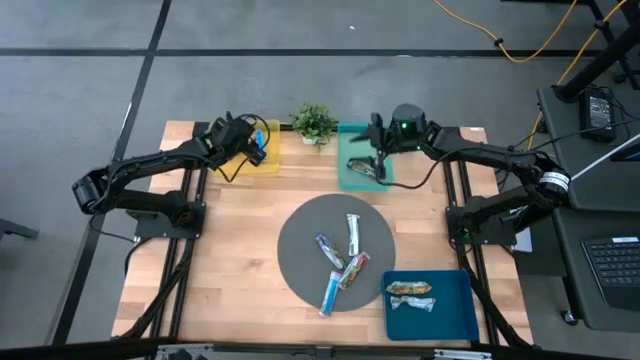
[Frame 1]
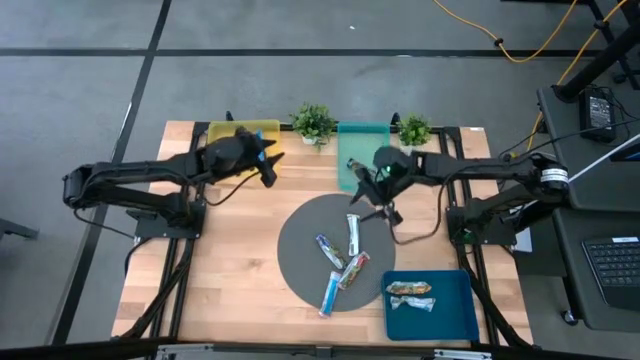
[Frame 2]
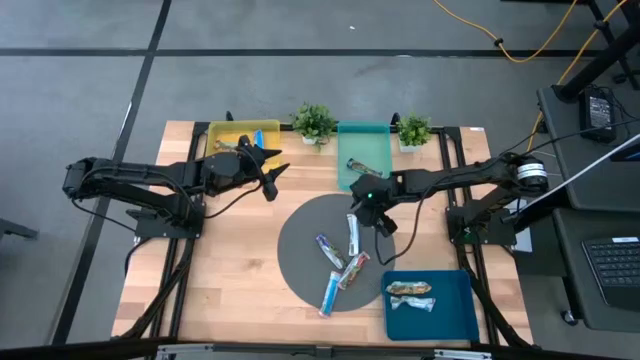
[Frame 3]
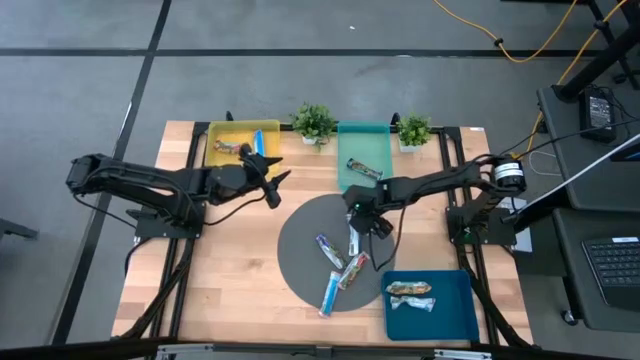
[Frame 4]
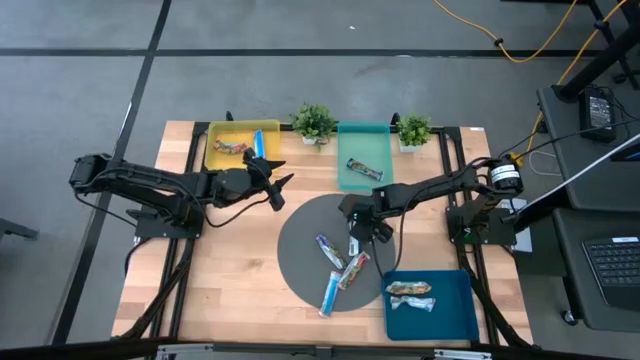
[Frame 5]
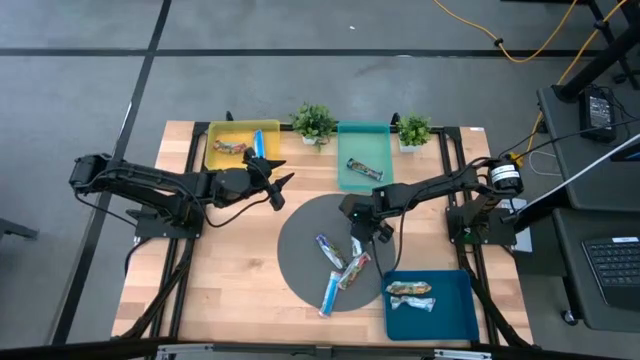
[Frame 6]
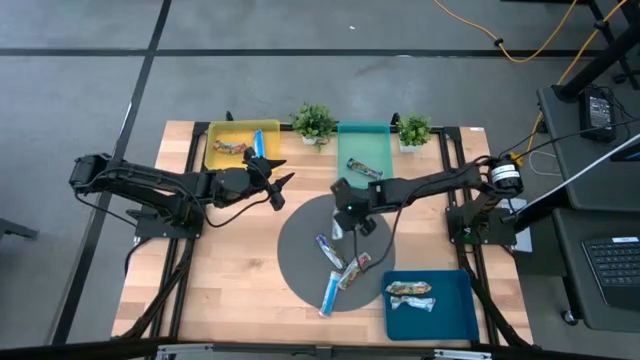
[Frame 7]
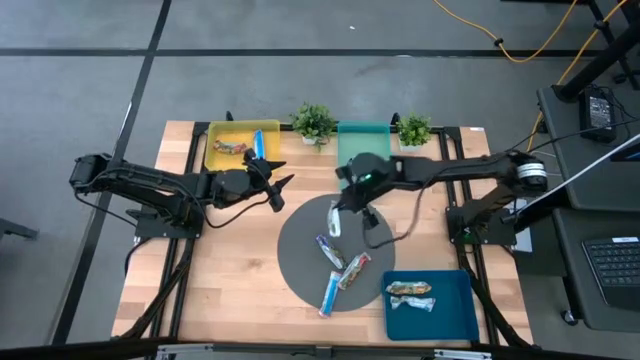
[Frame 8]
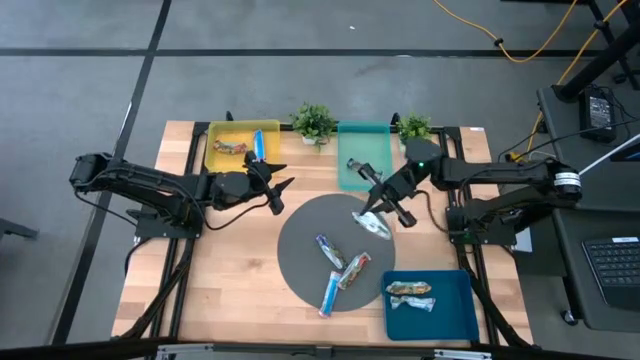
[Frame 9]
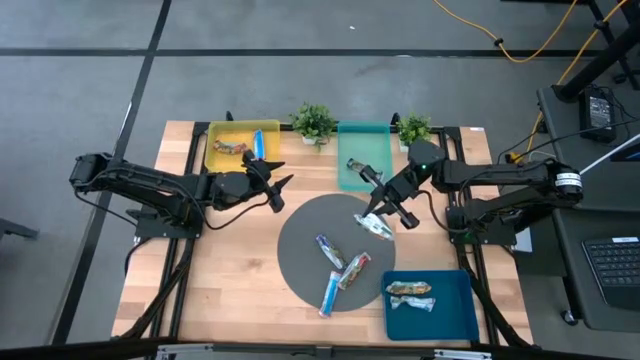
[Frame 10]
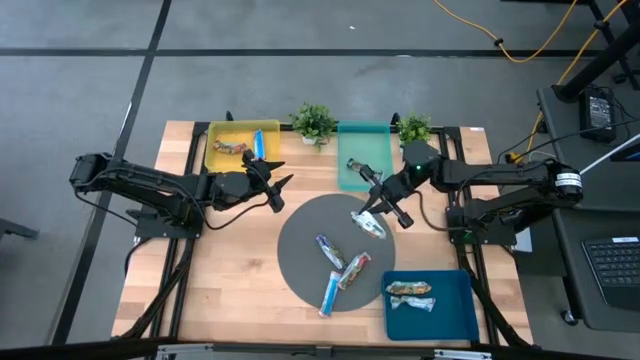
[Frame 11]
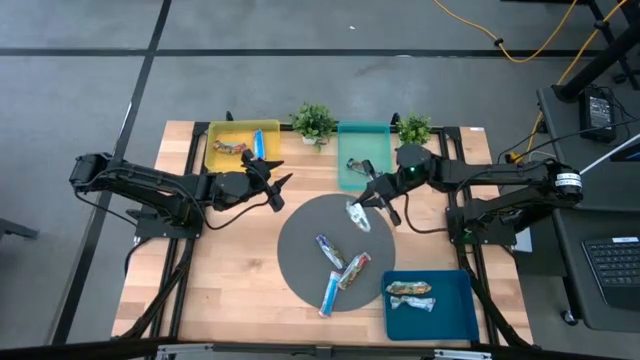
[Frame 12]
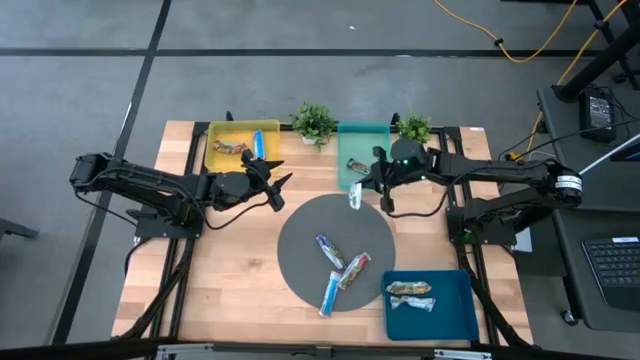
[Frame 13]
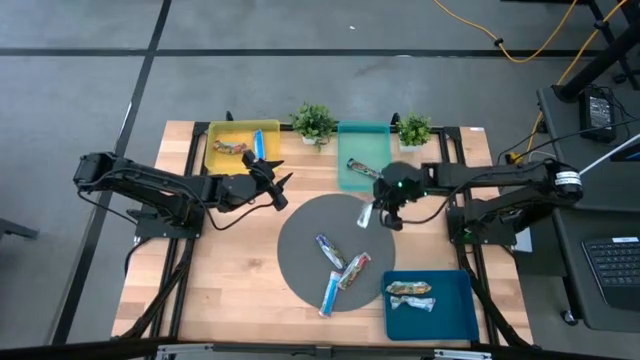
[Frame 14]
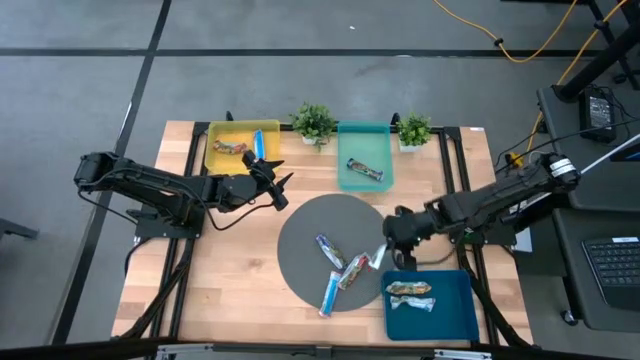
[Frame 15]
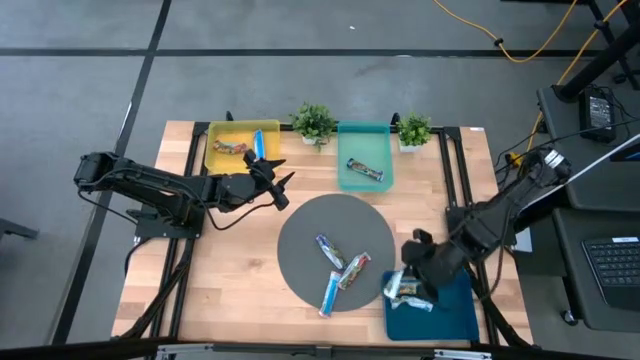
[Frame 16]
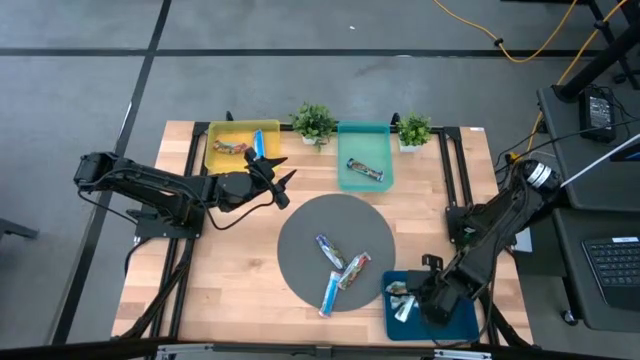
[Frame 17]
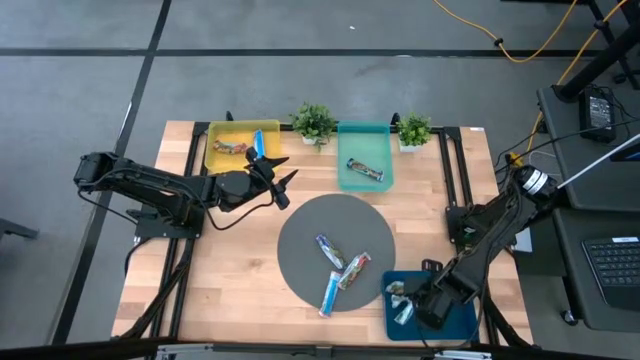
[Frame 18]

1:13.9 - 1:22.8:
Task: Pick and place Granola Bars by type
Put the yellow granola bar into the blue bin

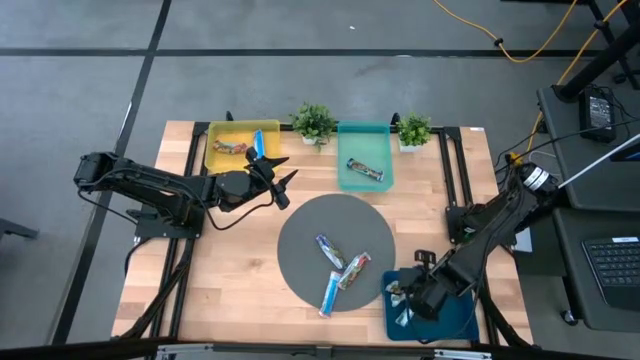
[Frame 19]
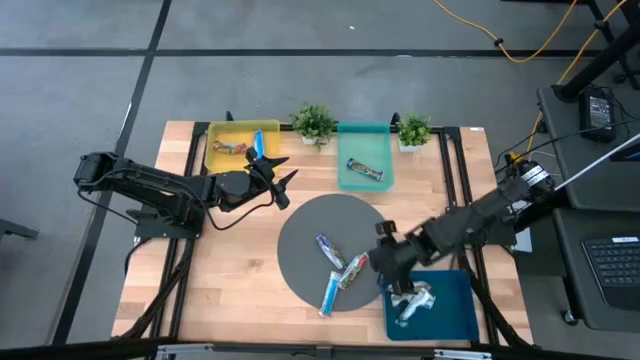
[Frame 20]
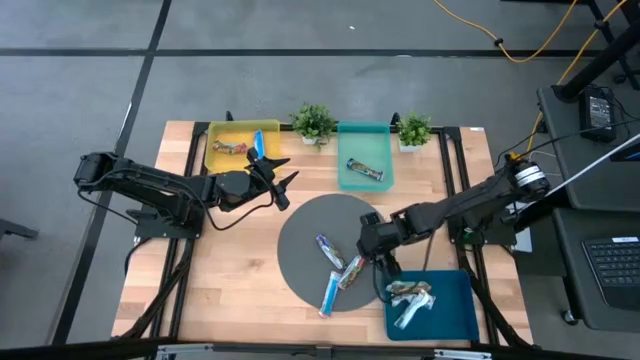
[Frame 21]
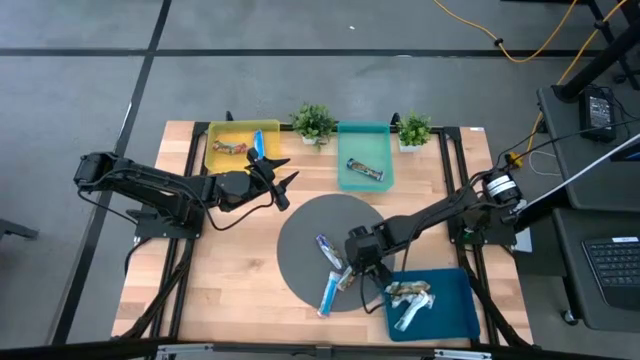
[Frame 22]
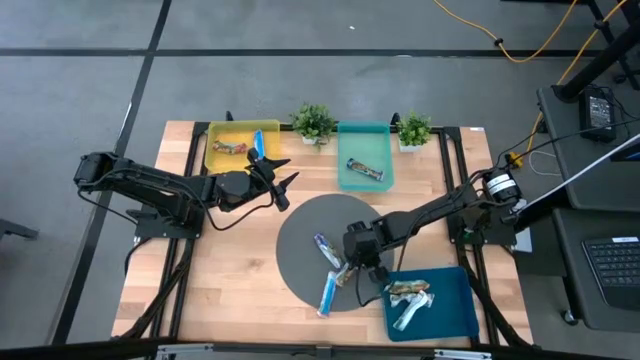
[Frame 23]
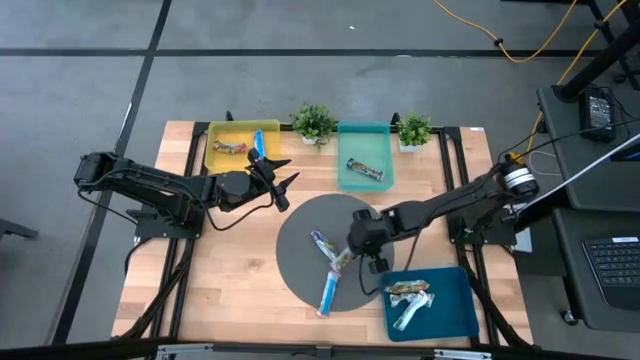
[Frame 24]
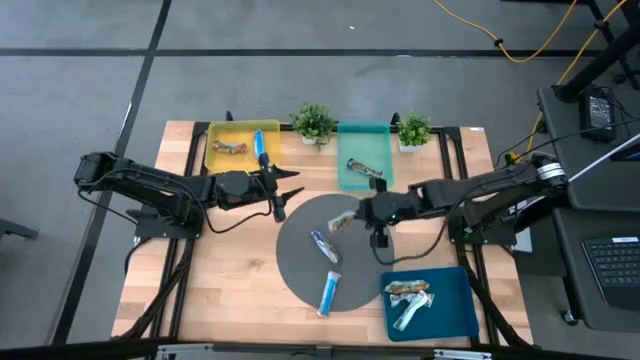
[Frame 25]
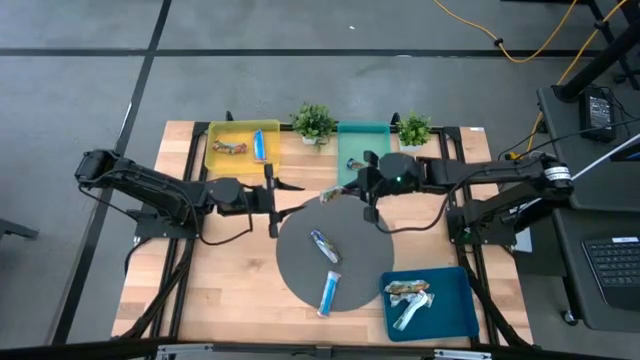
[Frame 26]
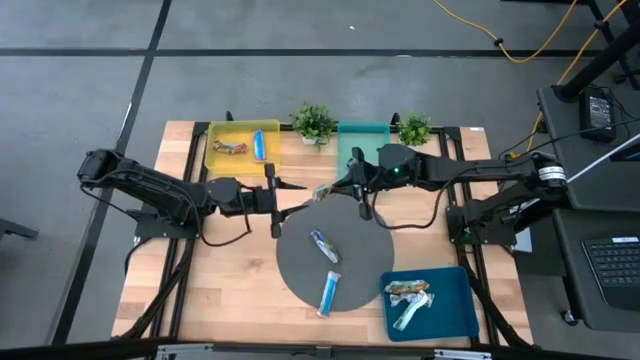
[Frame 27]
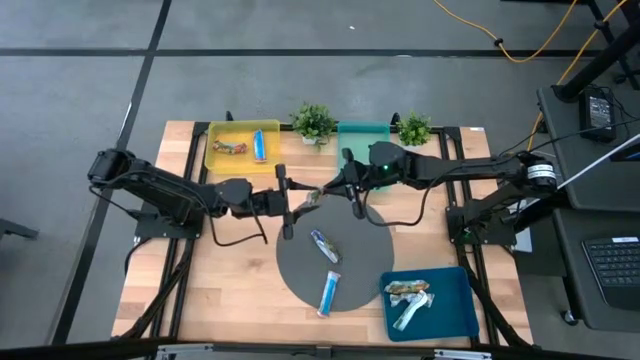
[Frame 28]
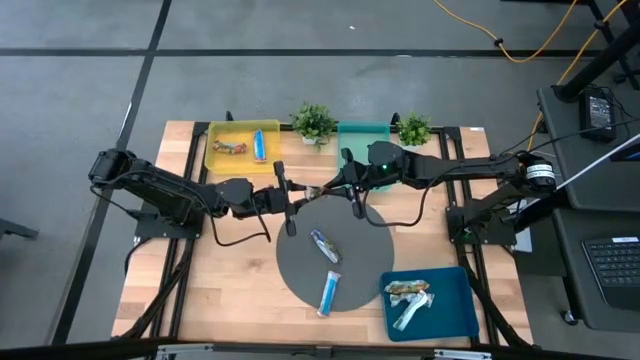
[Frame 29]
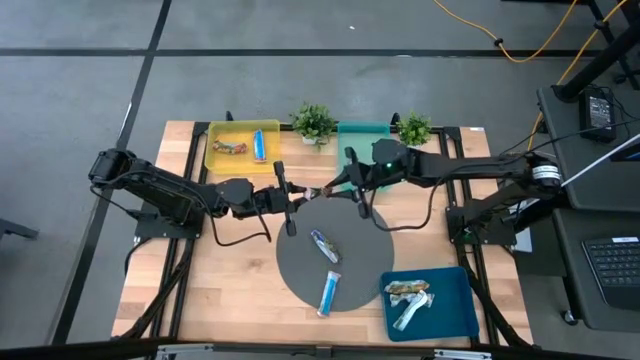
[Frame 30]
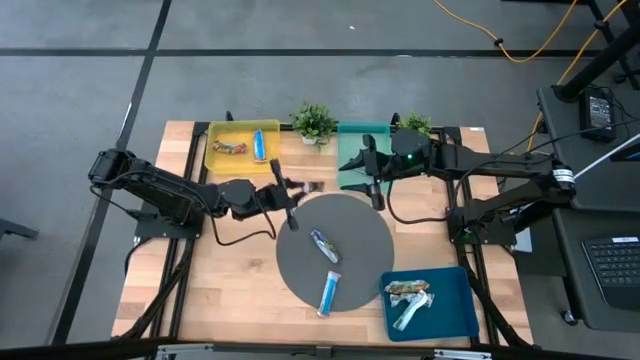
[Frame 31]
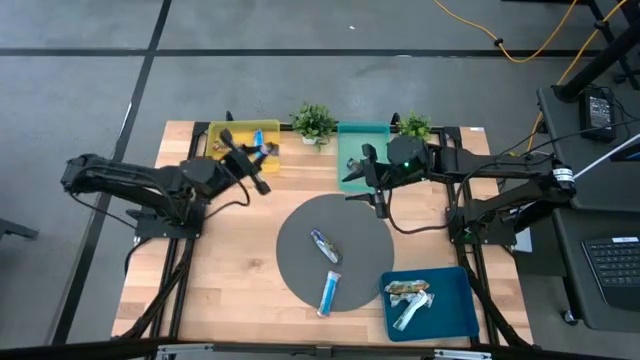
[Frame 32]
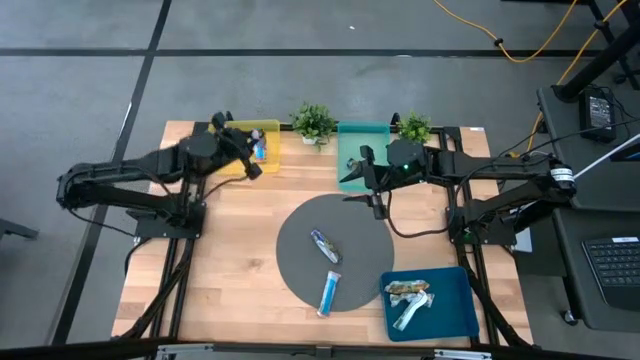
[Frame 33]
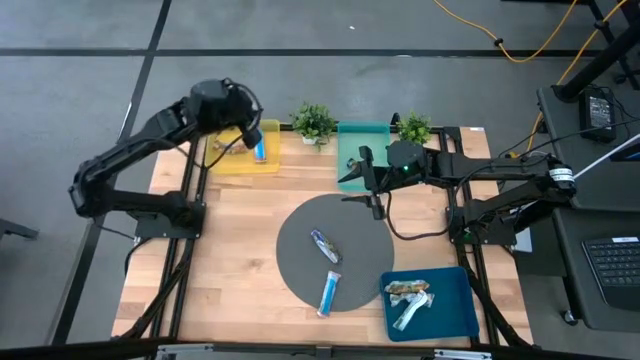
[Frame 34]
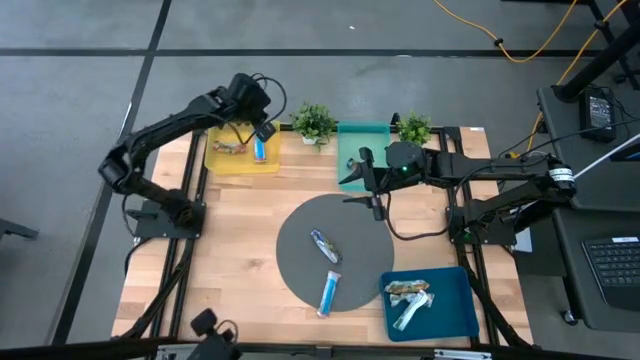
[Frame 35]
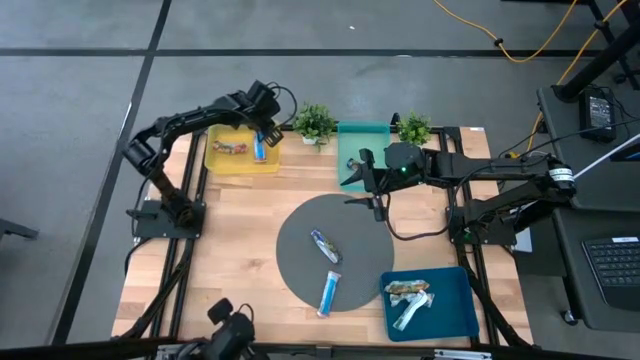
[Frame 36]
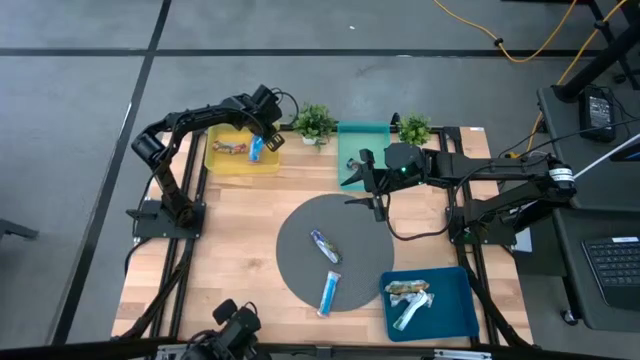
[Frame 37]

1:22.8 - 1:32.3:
Put the red granola bar into the yellow bin

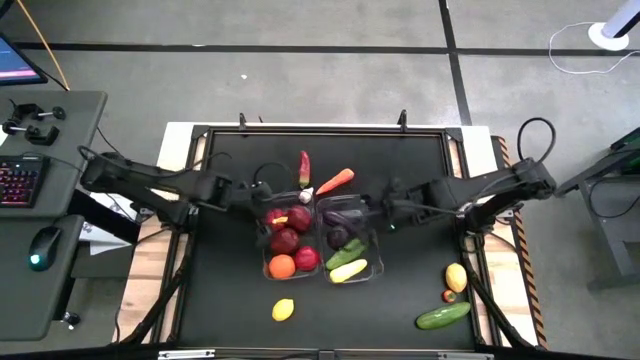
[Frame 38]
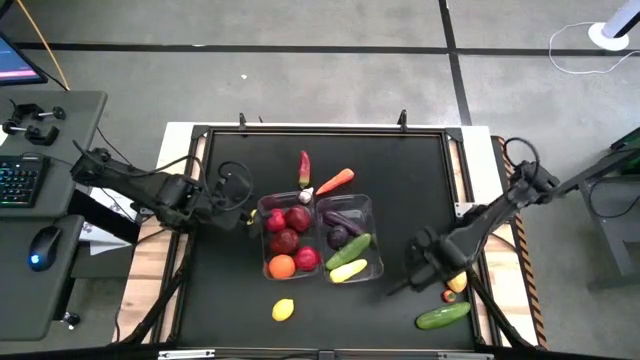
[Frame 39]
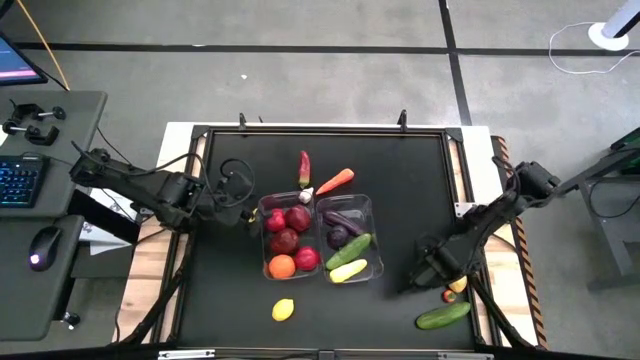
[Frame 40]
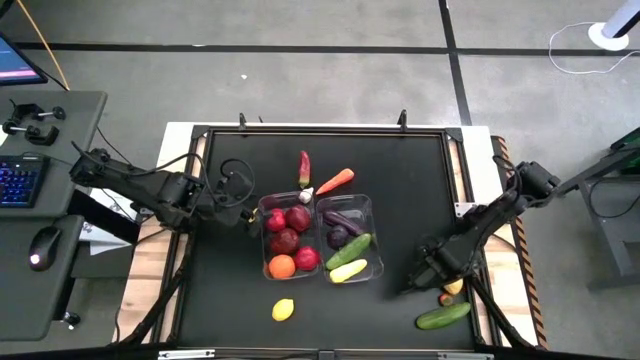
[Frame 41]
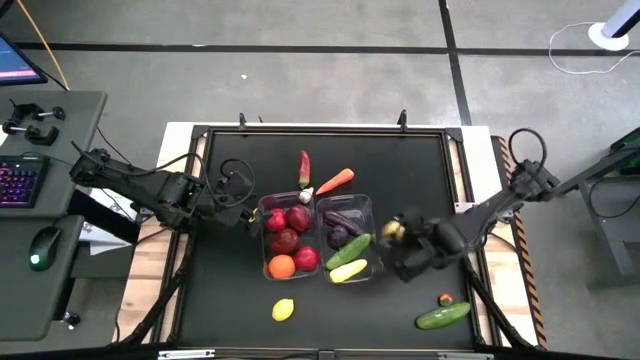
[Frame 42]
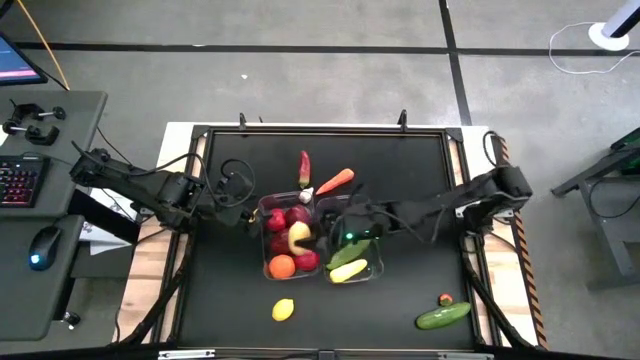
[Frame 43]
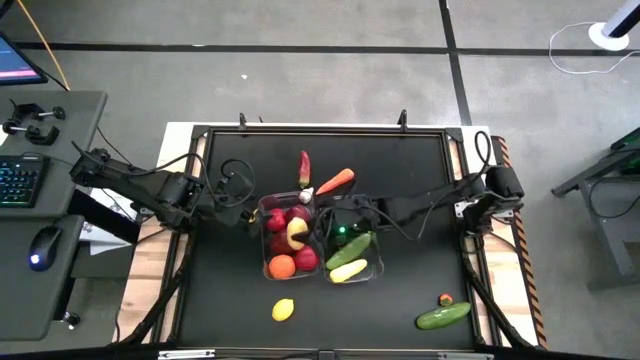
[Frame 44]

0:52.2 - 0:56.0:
Task: Sort produce into baskets
Put the right lemon into the left transparent bin
